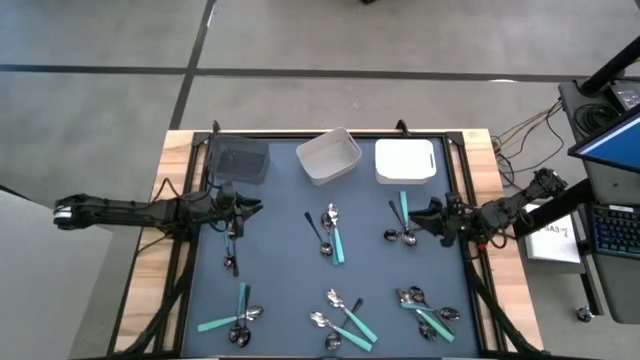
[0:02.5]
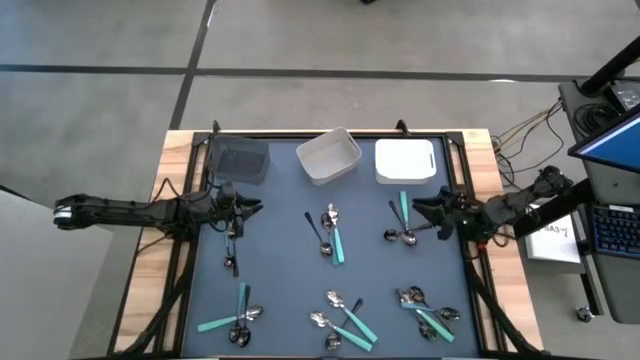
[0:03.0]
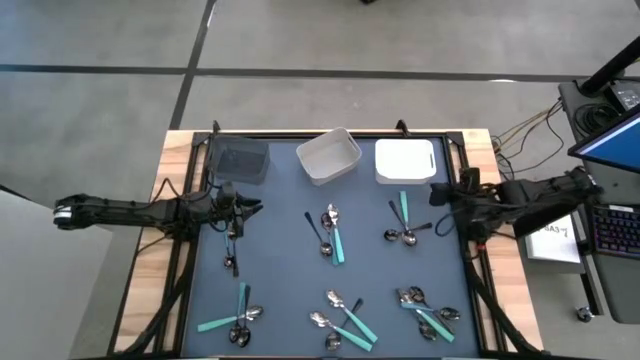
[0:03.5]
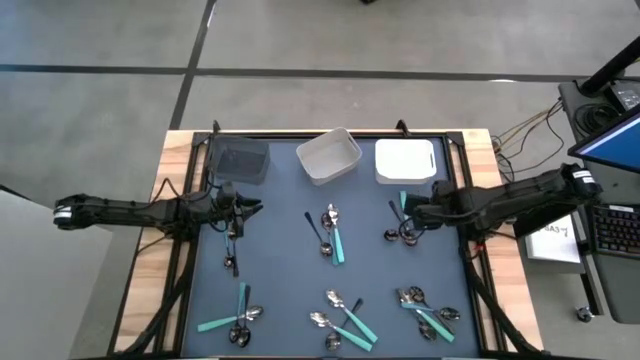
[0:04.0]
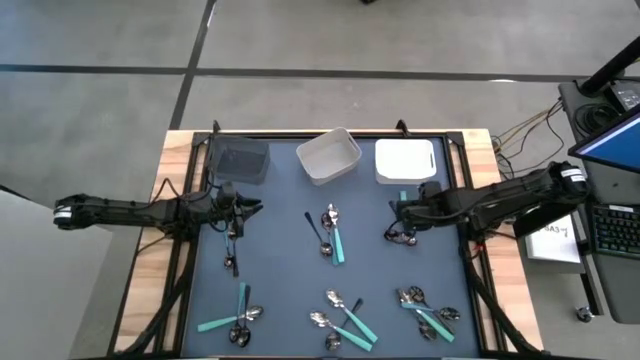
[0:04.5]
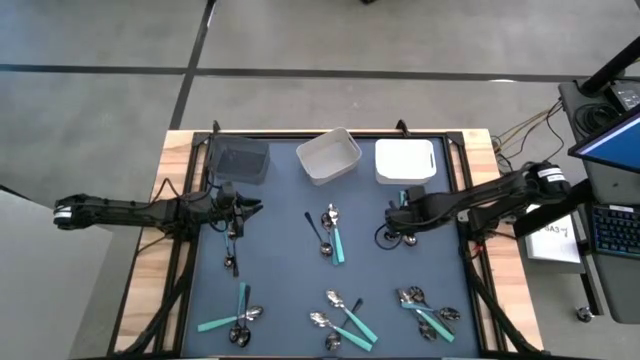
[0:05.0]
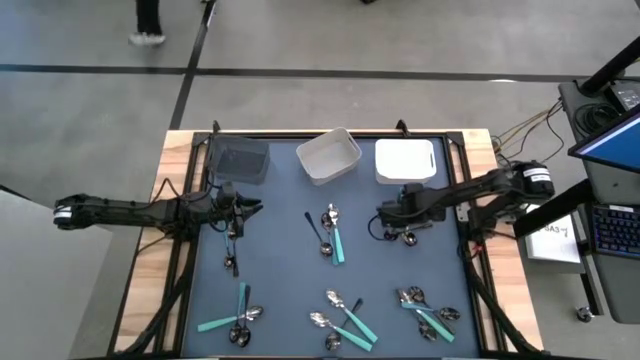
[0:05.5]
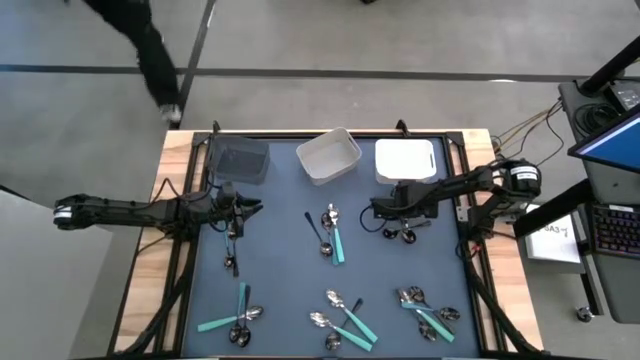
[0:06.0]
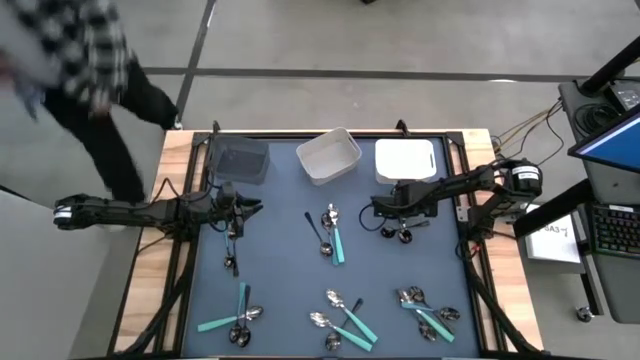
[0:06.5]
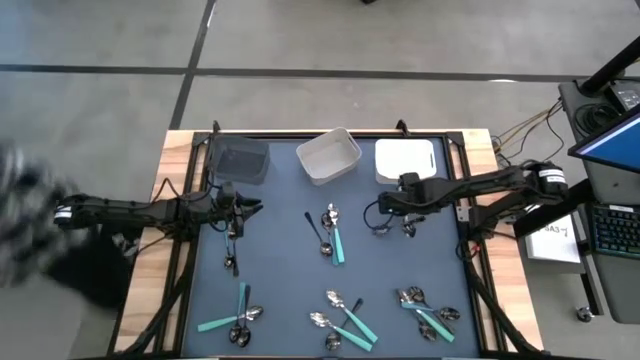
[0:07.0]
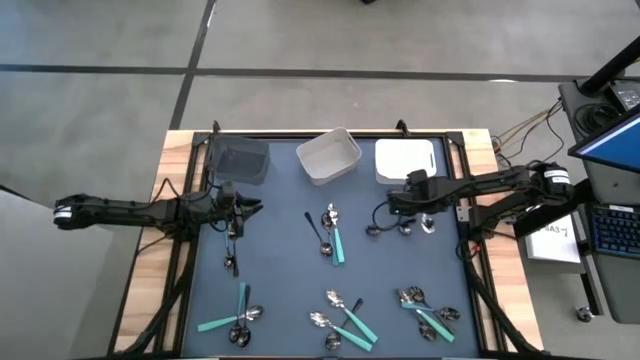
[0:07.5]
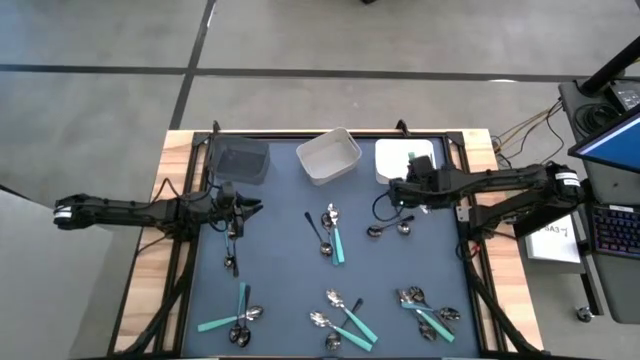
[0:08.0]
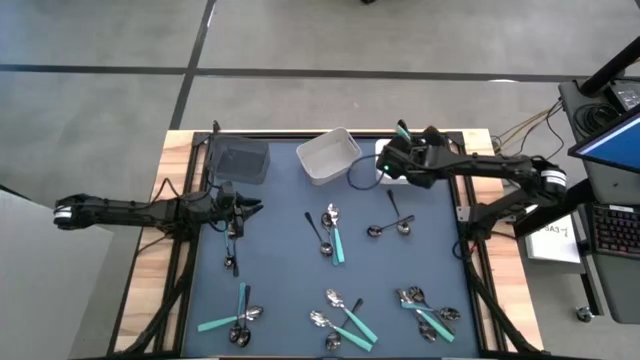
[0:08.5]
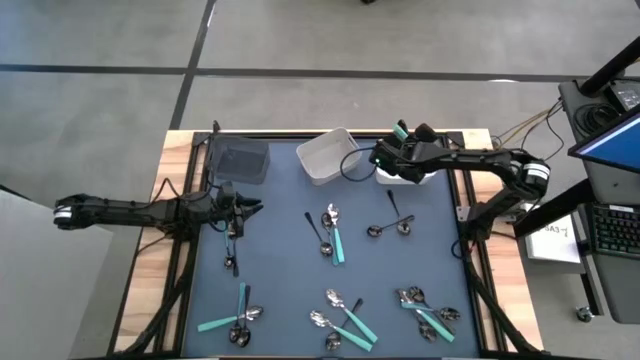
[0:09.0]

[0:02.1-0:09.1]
Task: Sort silverware by color (type)
Put the light blue spoon into the white bin

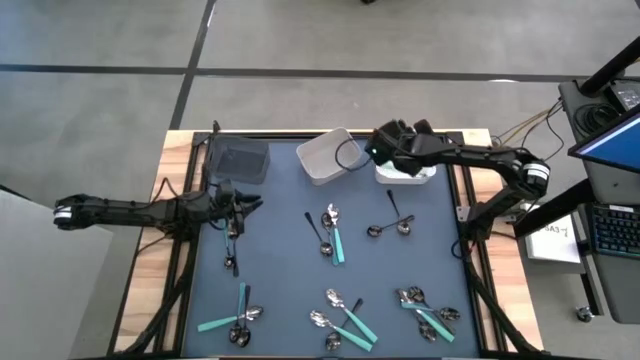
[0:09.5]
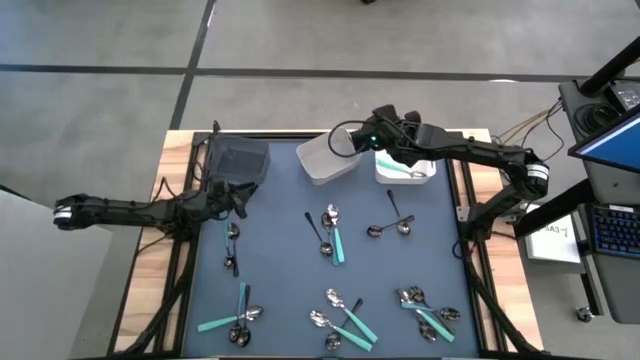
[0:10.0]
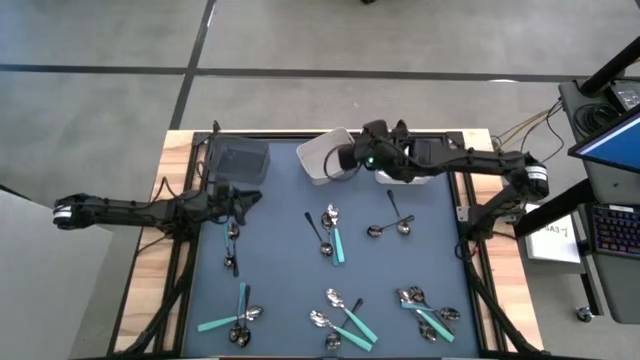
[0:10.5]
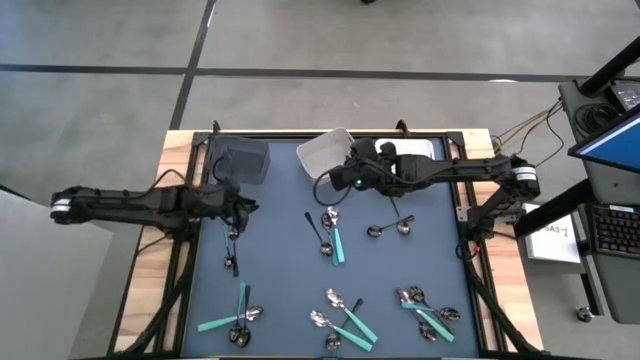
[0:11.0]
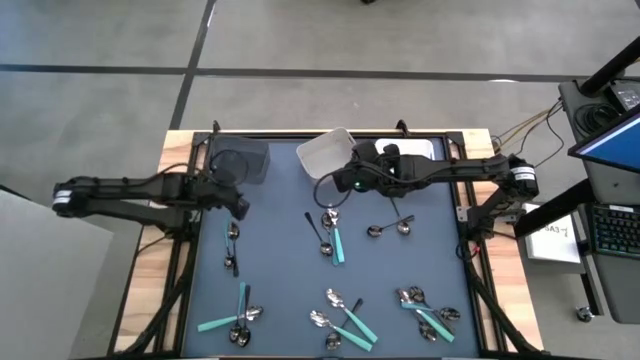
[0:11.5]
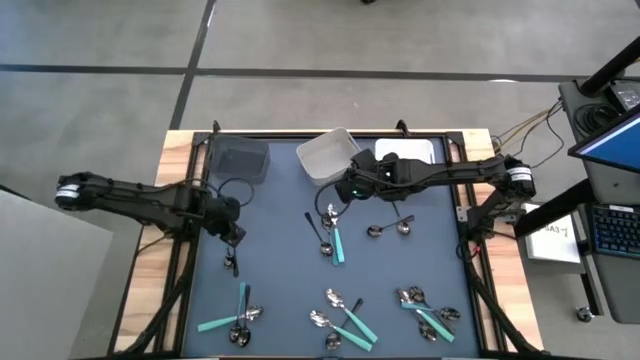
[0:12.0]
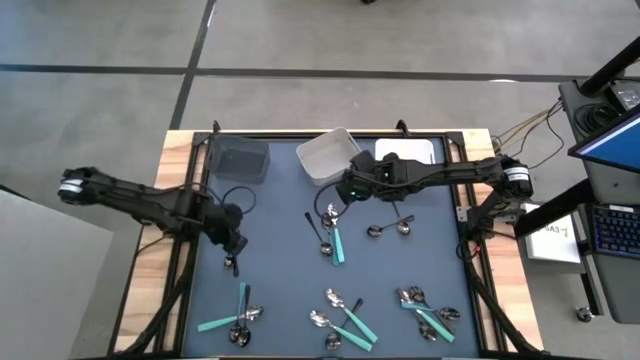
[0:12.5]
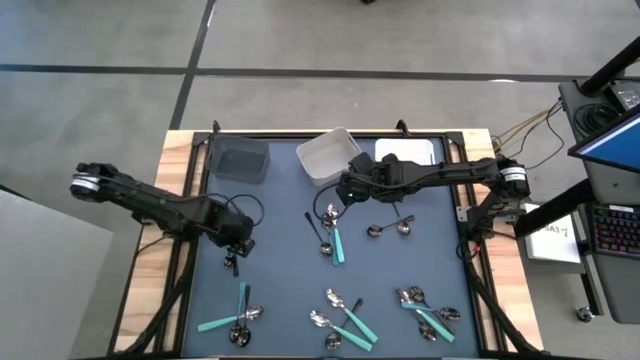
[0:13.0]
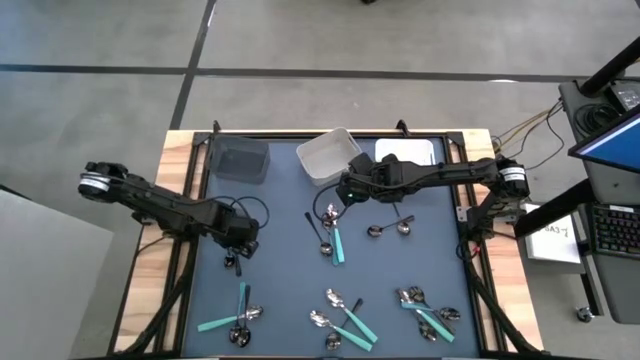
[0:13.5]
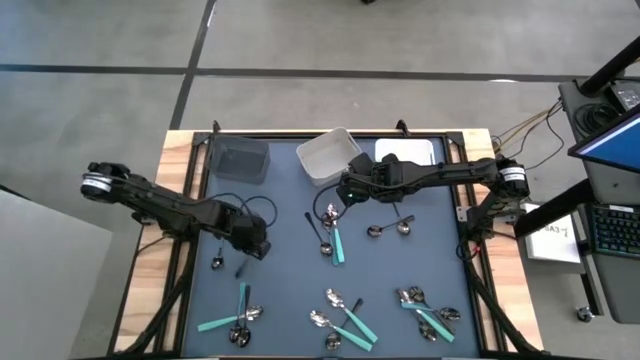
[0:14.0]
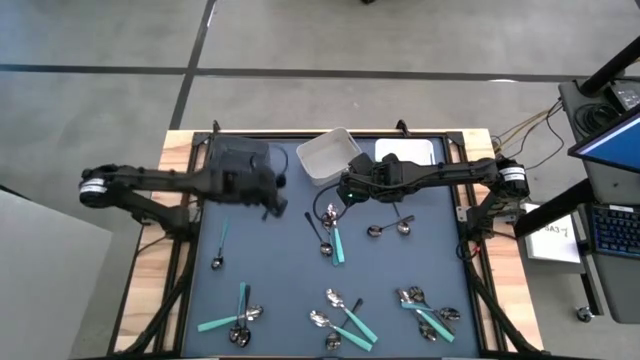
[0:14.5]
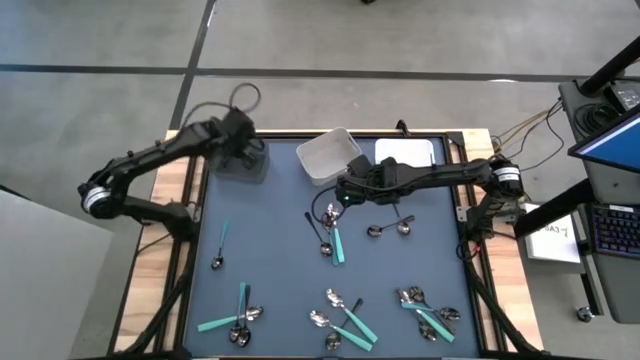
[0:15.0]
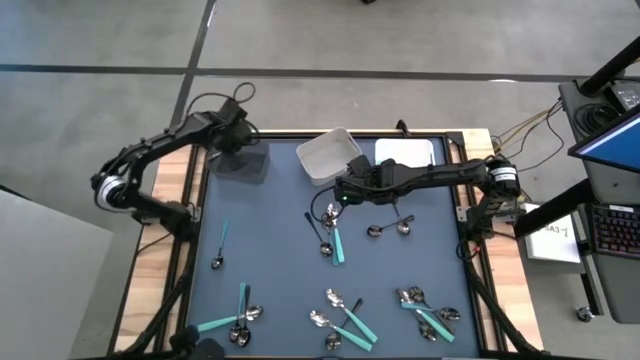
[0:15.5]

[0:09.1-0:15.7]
Put the black spoon into the black bin

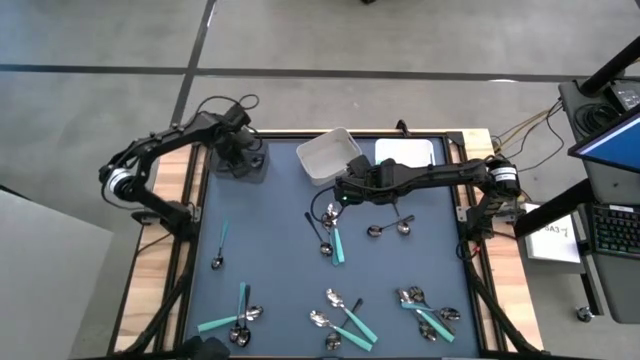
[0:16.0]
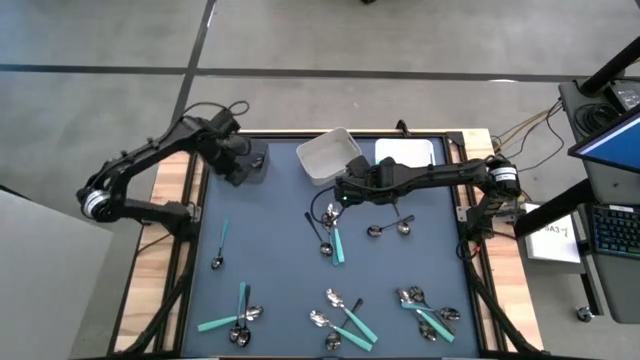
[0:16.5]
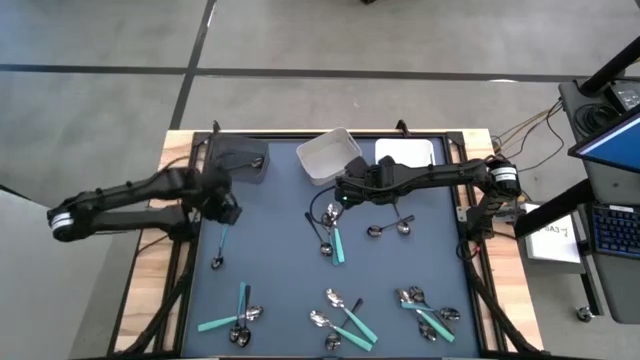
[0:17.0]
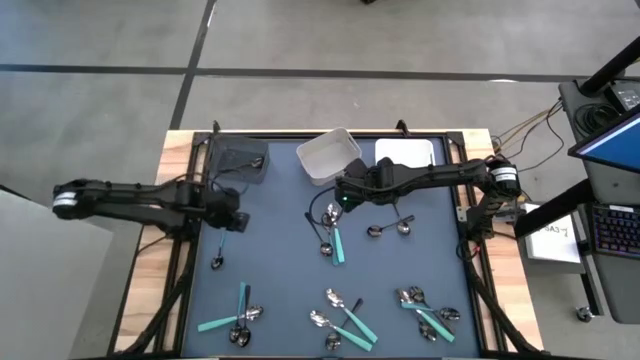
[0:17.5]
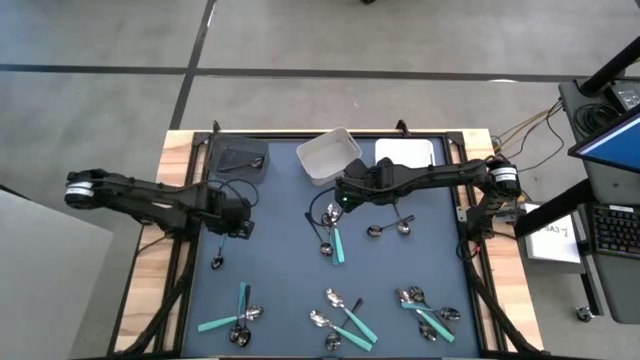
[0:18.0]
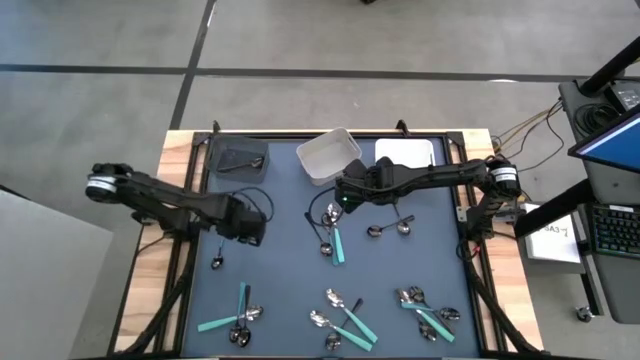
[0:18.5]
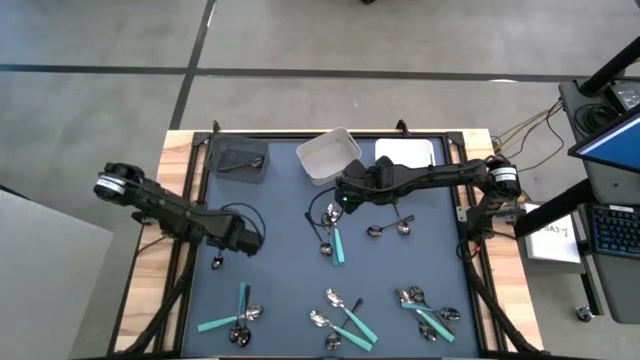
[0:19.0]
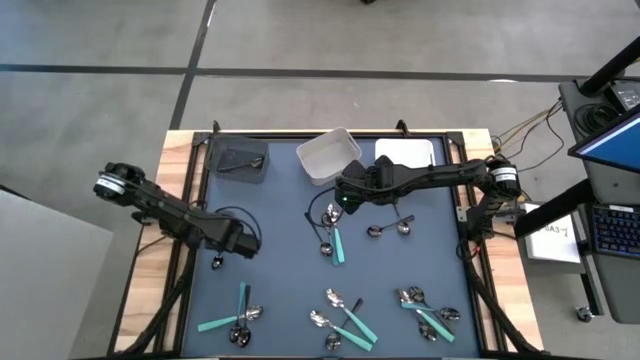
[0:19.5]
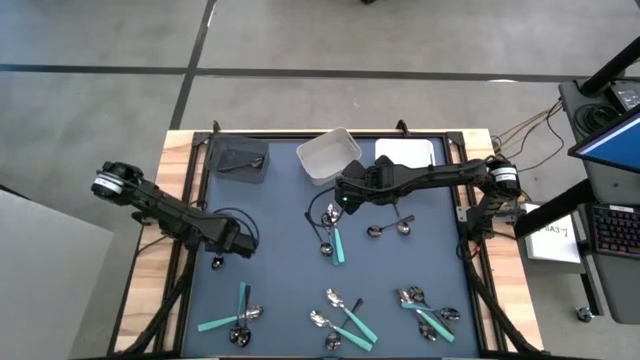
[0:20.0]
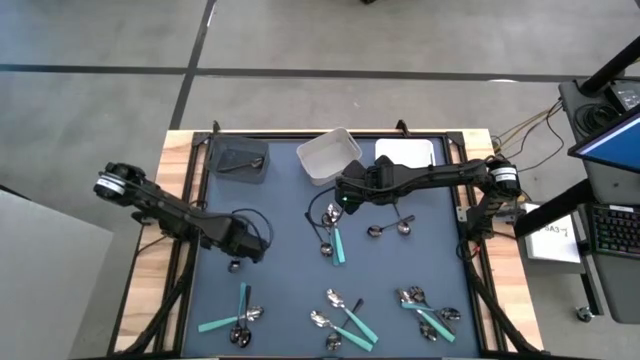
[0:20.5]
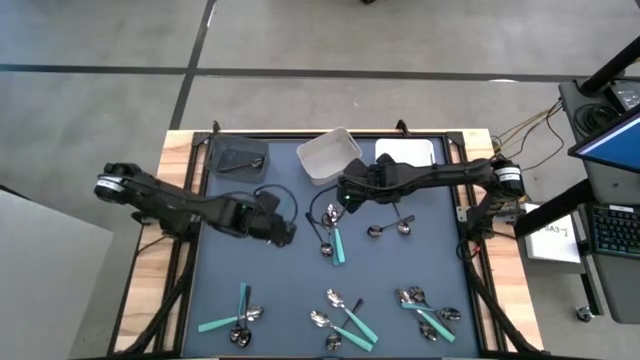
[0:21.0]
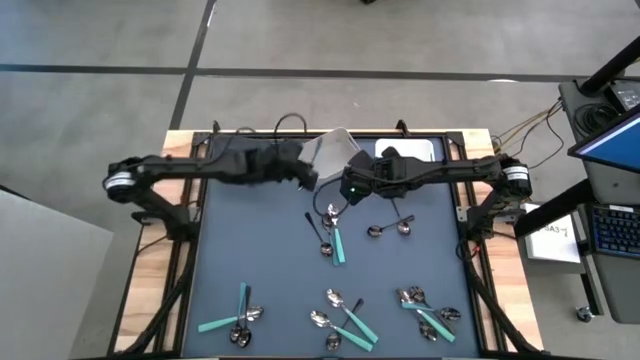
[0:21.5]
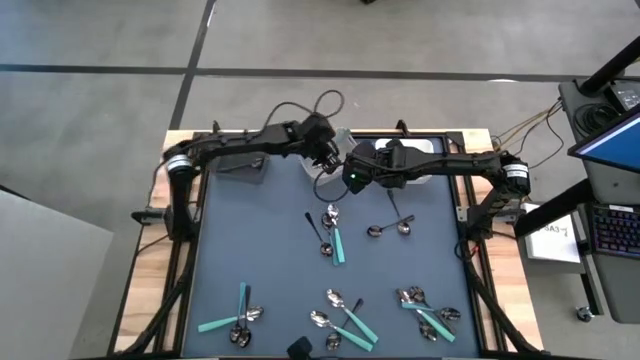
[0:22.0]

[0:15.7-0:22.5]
Put the blue spoon into the gray bin

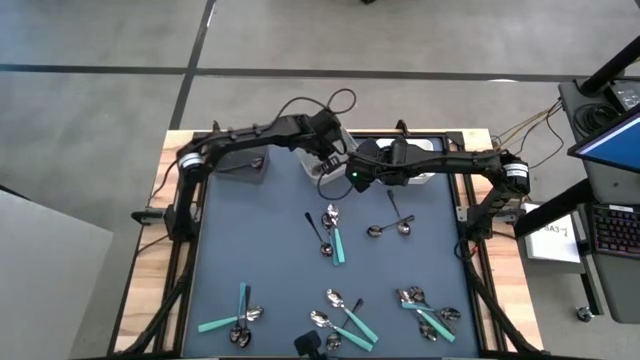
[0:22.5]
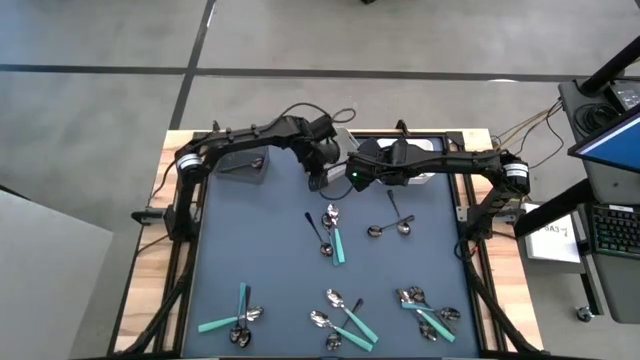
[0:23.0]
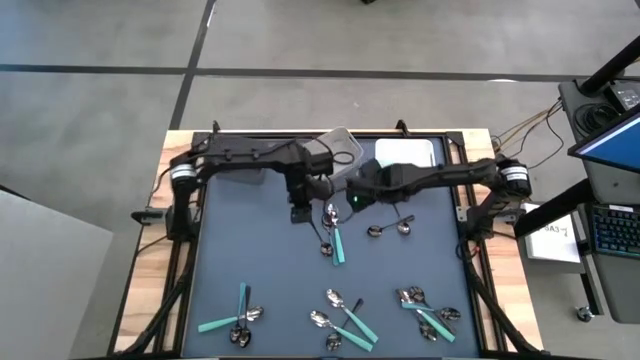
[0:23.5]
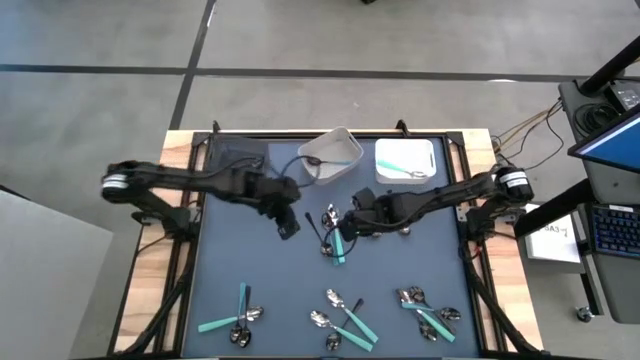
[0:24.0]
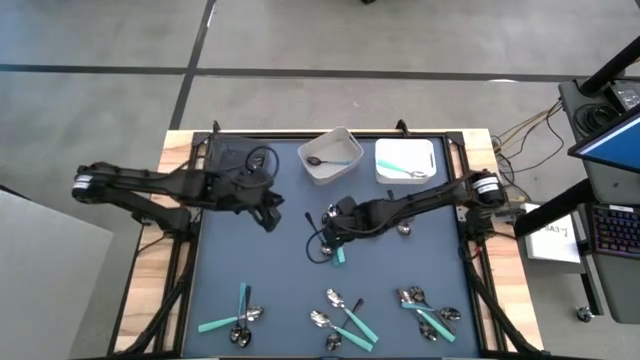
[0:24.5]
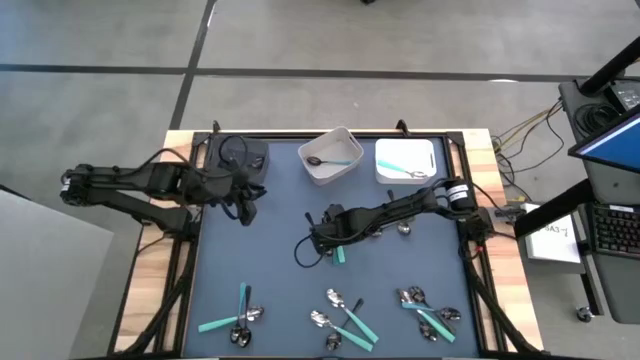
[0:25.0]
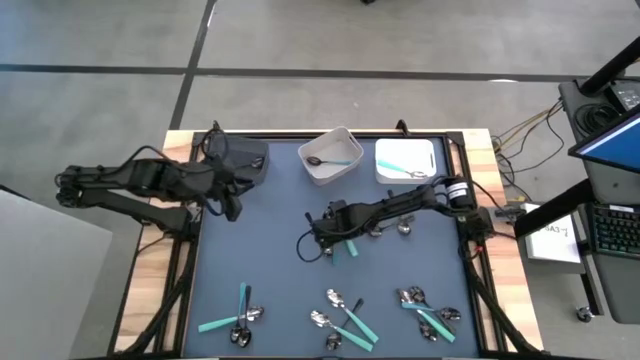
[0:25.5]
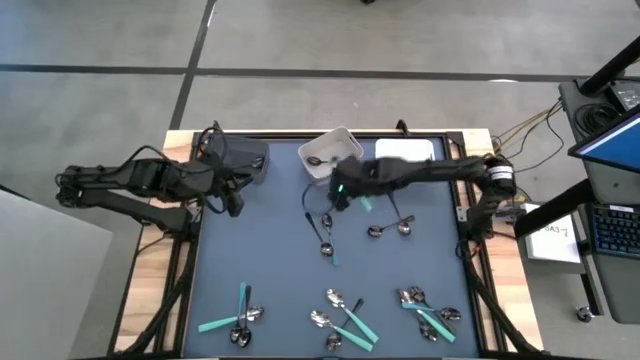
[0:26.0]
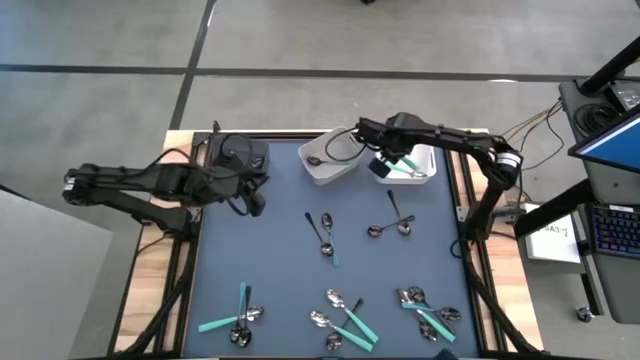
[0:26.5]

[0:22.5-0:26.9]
Put the light blue spoon into the white bin
